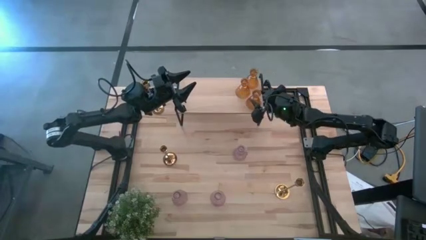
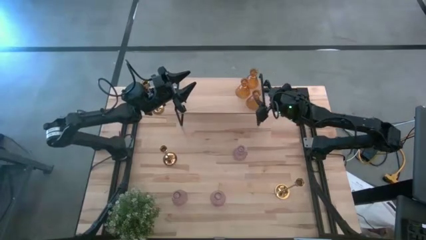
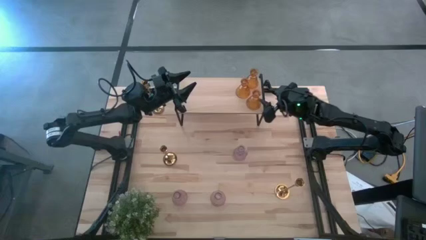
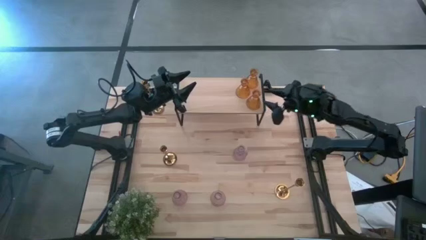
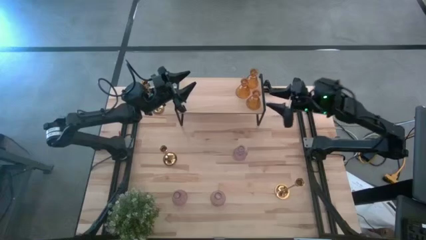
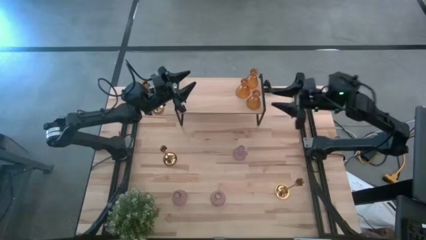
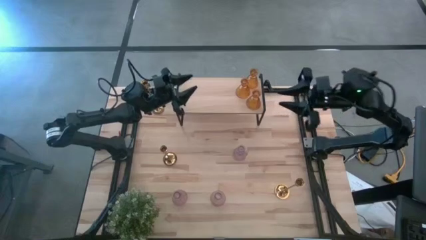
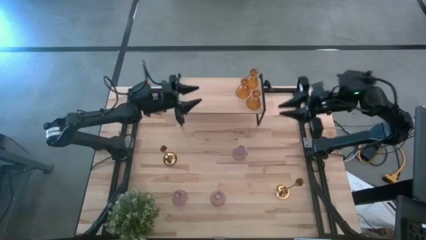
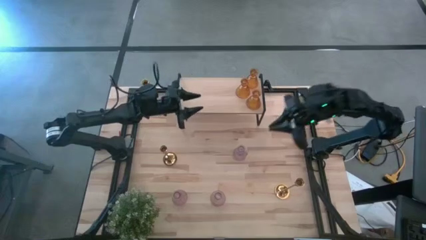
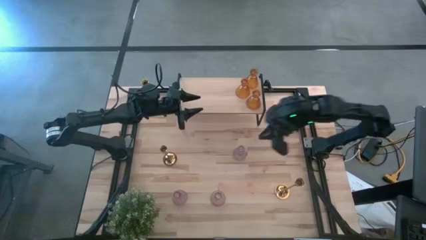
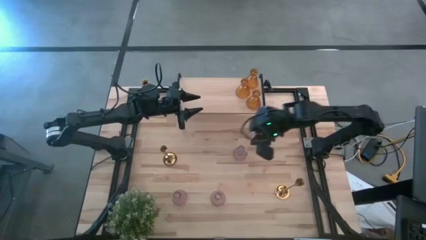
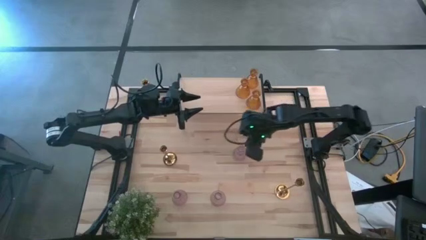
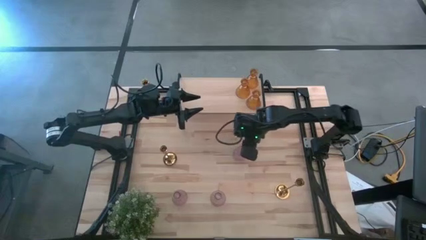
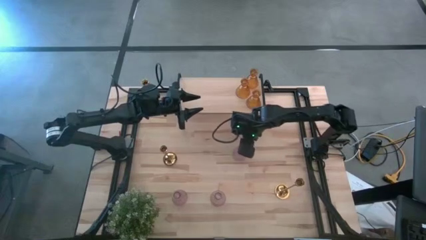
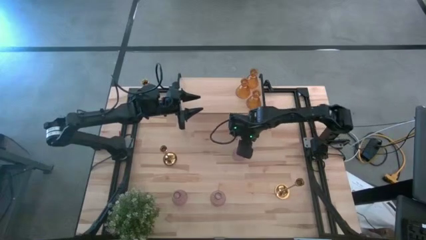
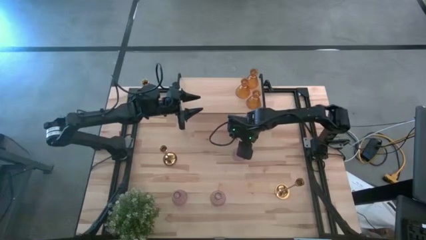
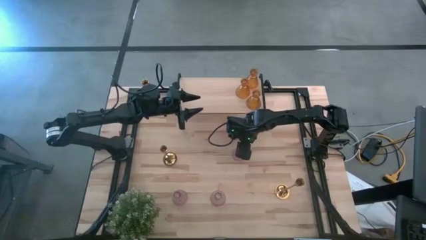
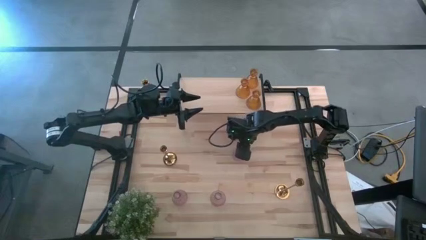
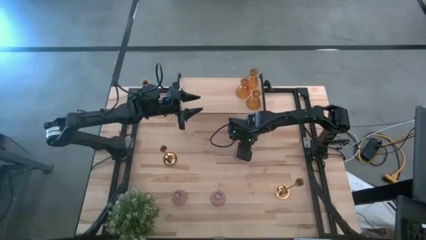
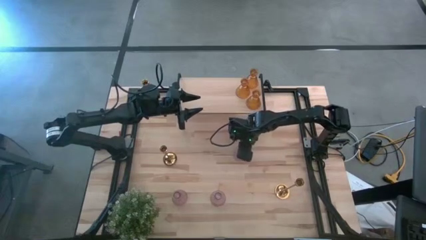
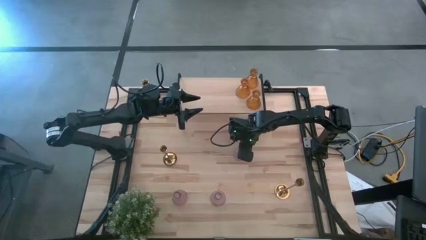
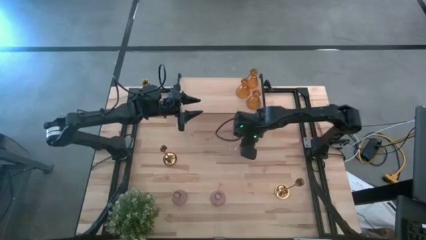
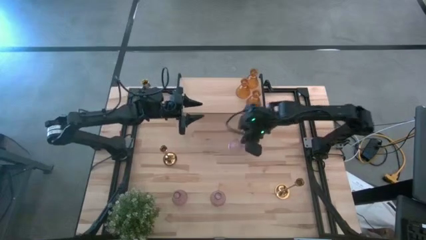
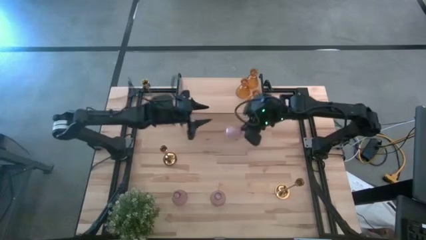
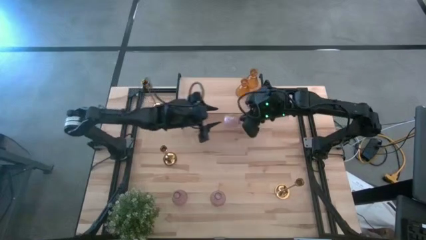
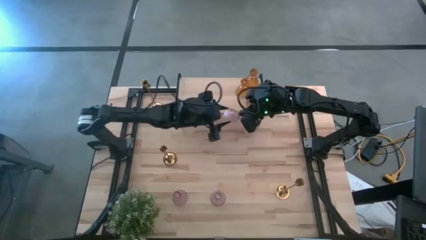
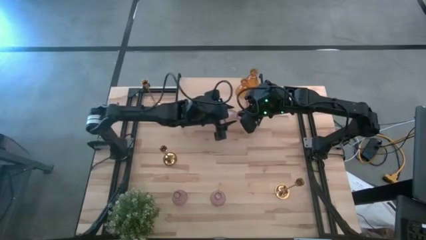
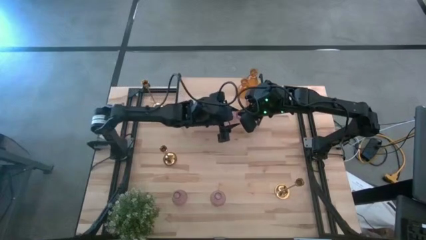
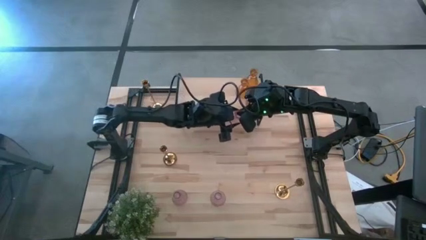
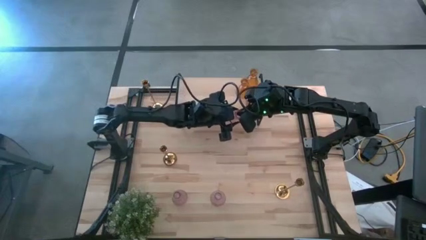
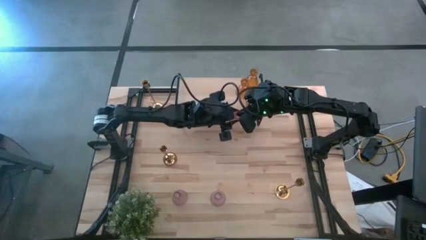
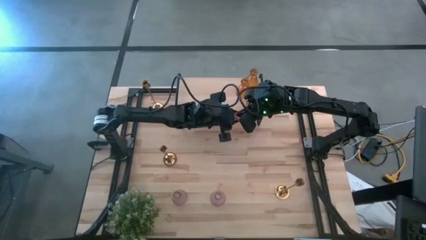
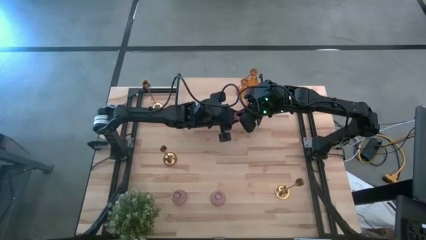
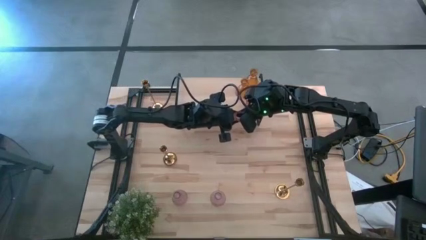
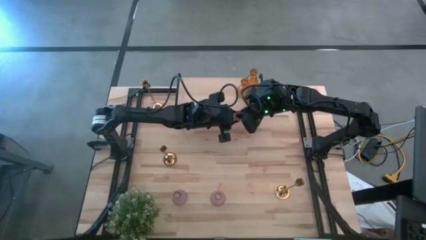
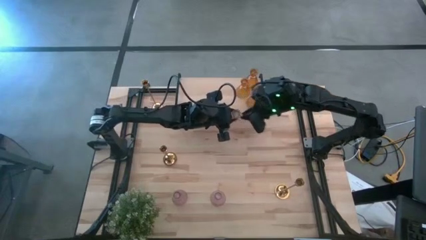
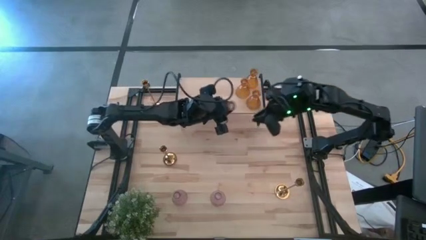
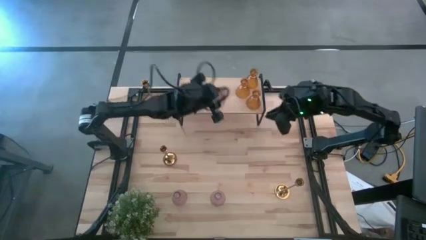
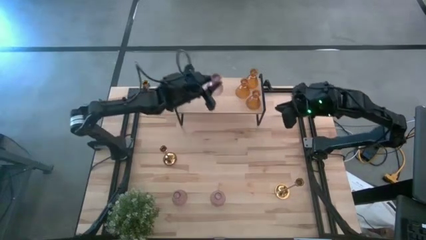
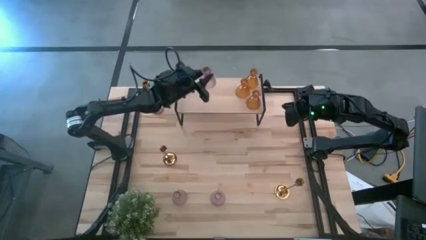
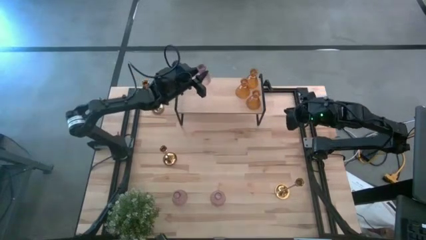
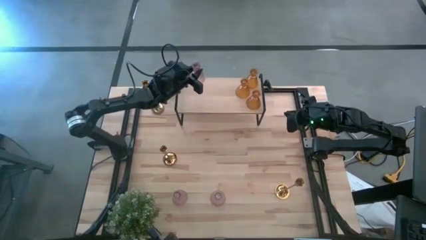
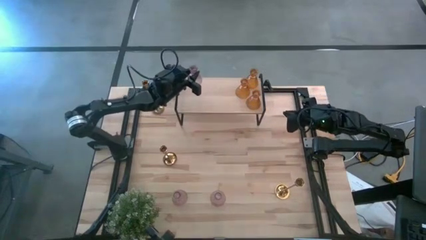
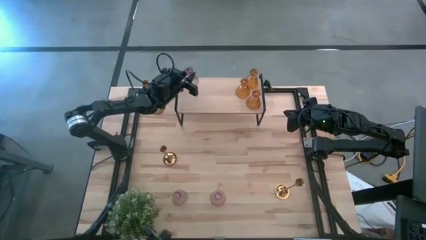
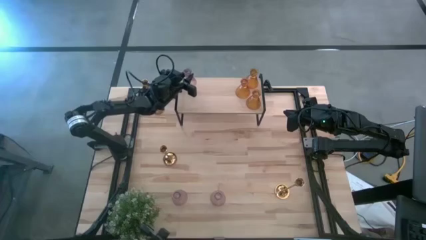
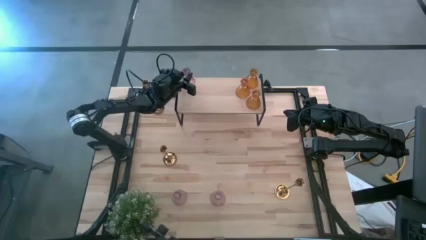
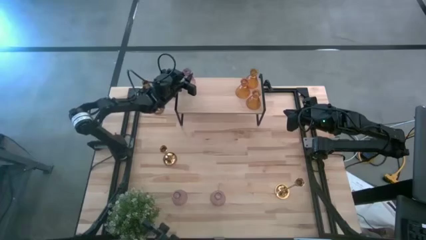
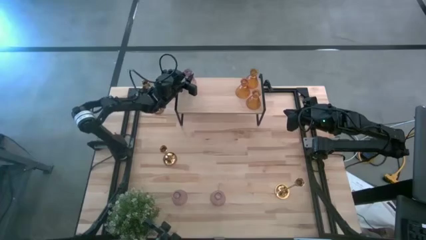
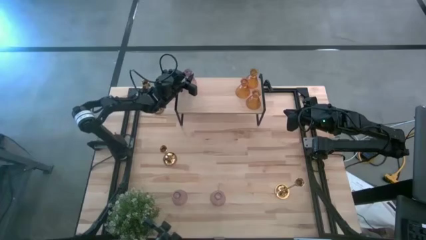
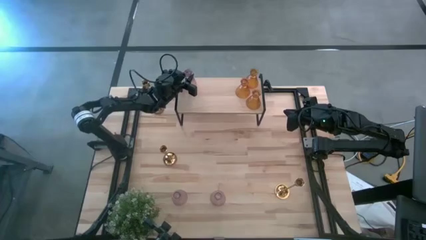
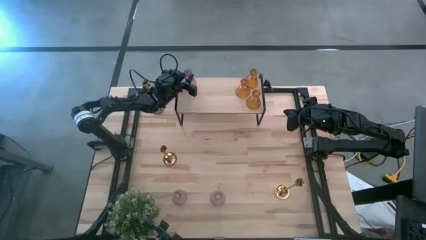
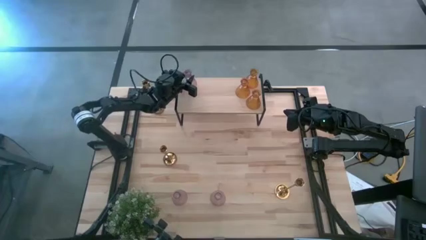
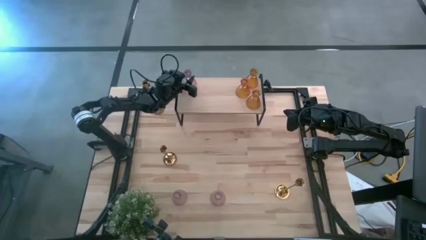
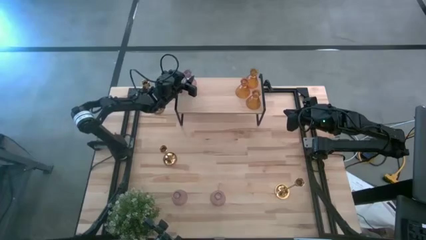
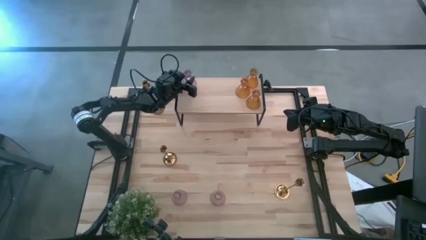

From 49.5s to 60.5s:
Task: Pick & Place candle stick holders
Put the top purple glass candle holder on the shelf

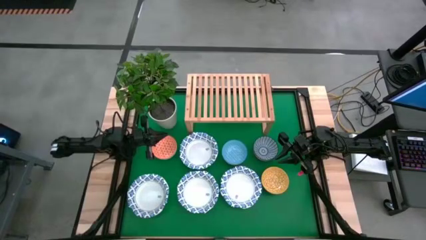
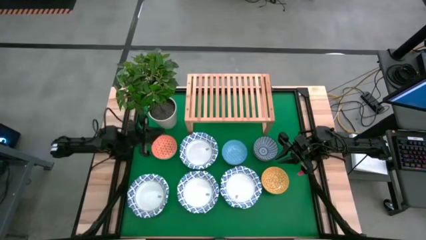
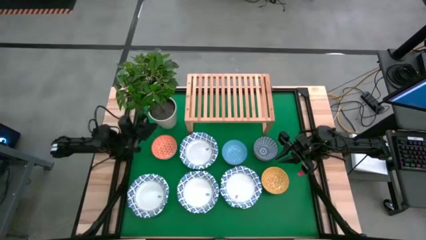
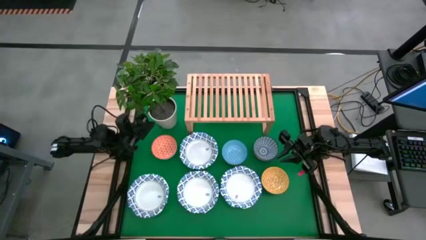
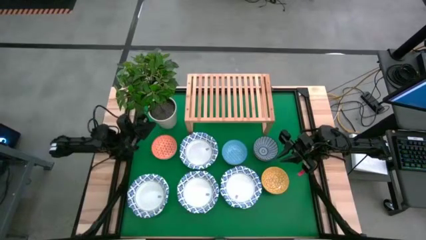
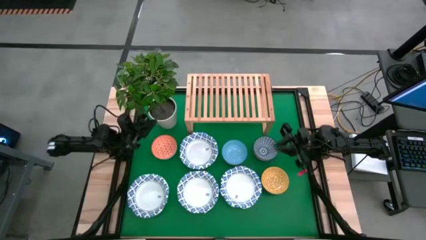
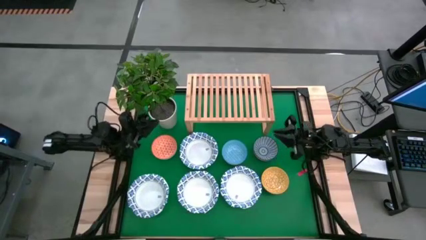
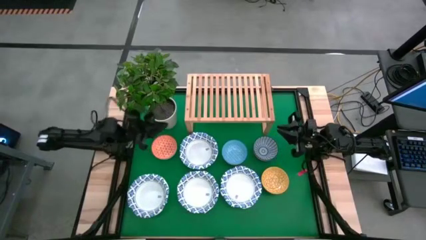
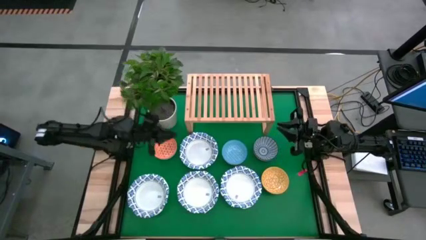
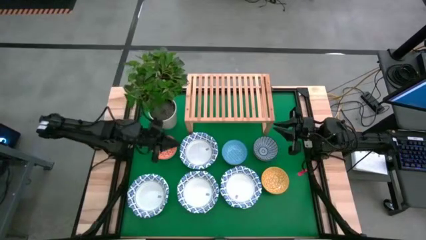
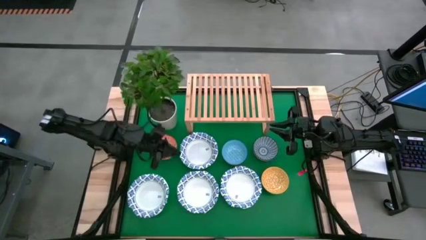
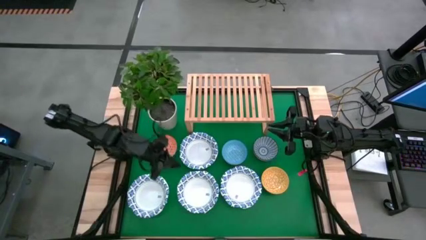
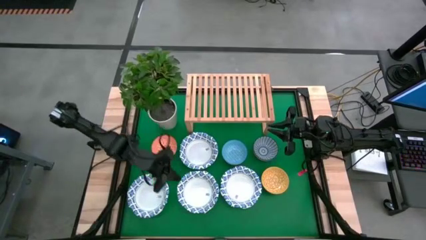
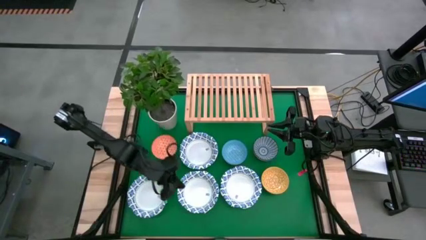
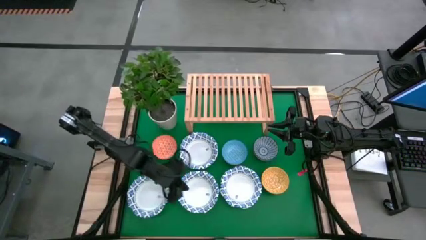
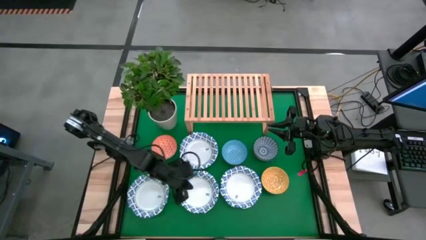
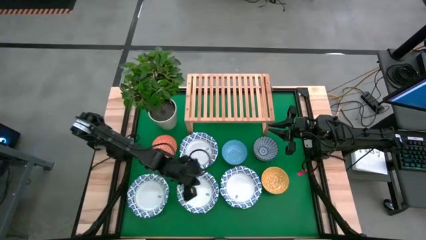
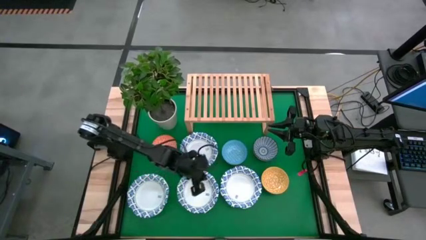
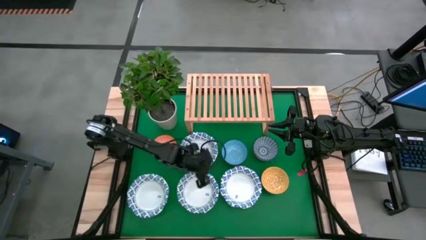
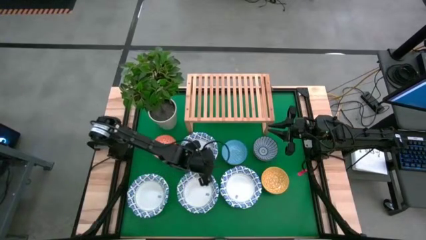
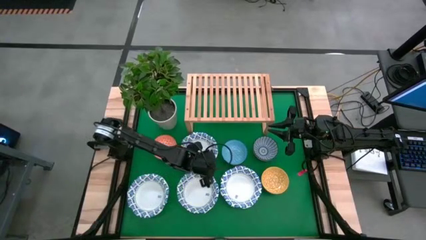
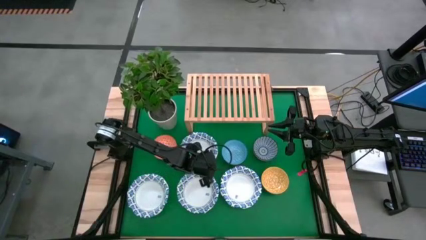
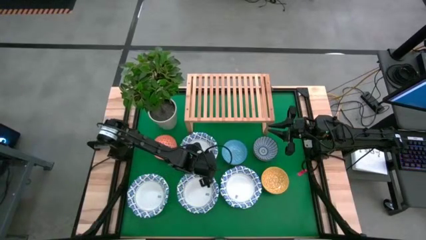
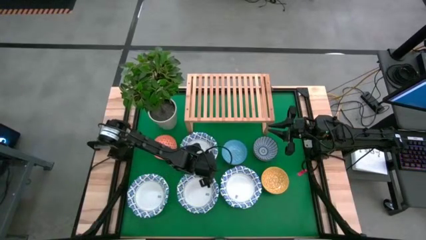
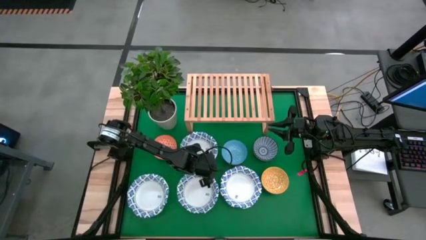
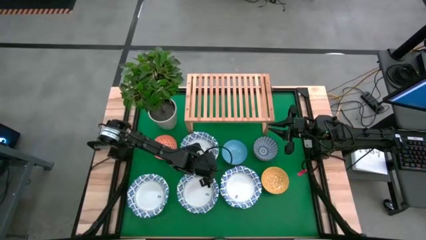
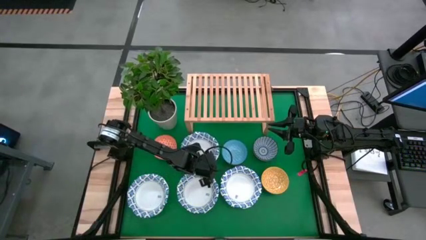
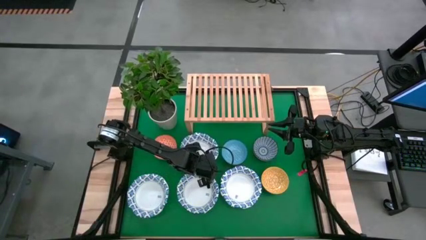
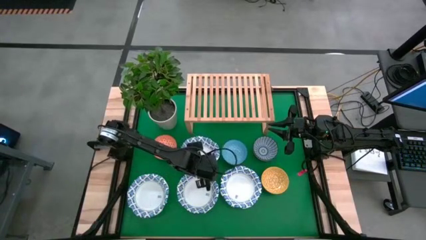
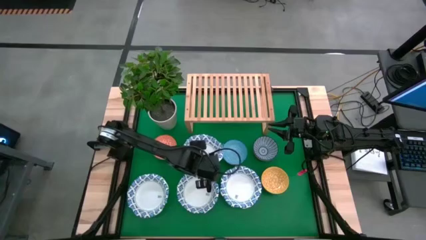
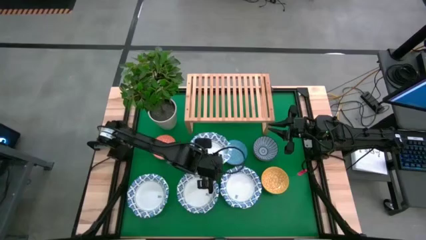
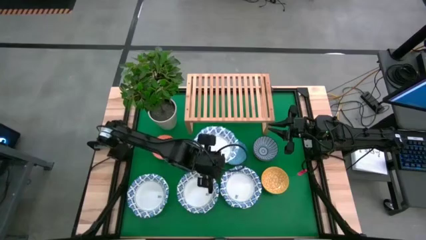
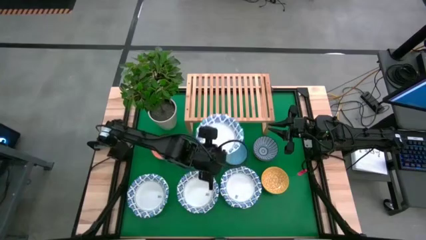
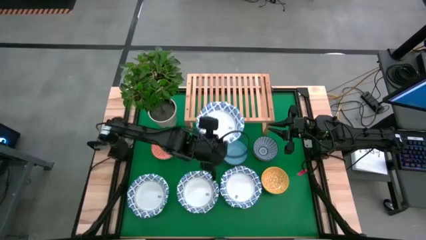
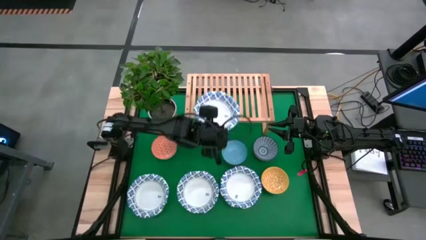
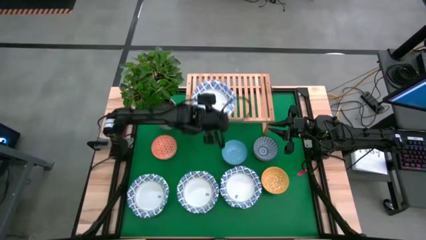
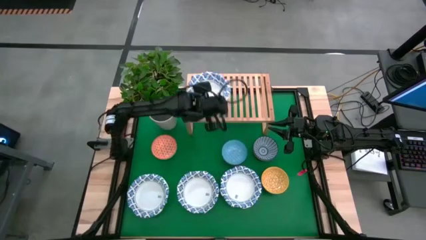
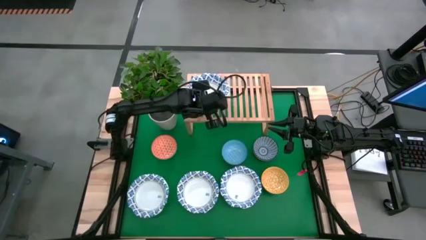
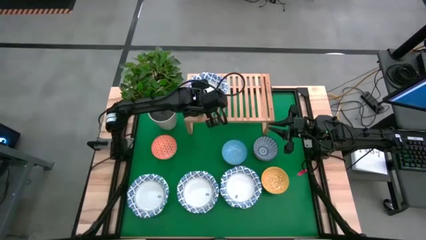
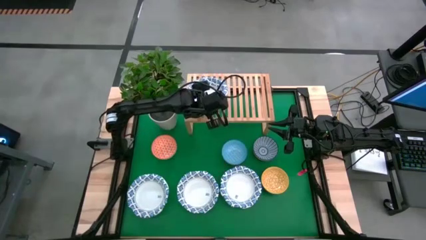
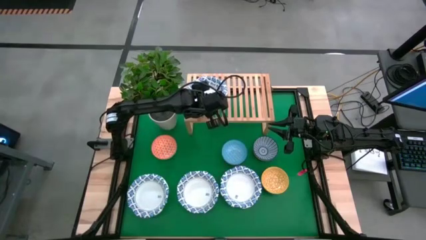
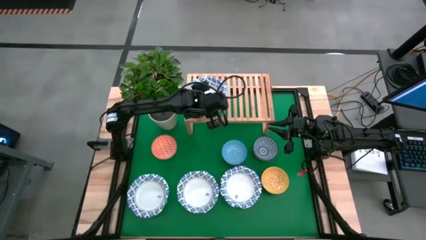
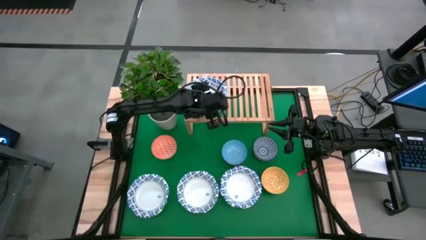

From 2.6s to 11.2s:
Task: Place and stack bowls onto a shelf
Put the blue/white bowl on the shelf
